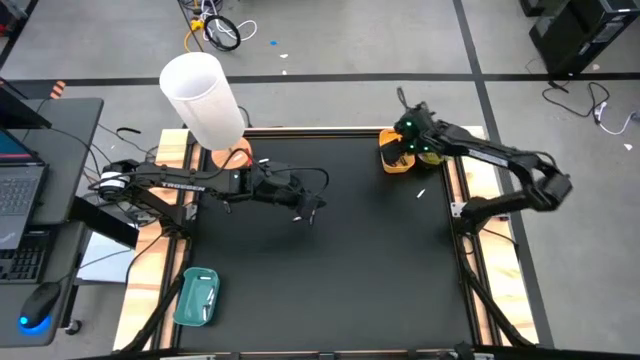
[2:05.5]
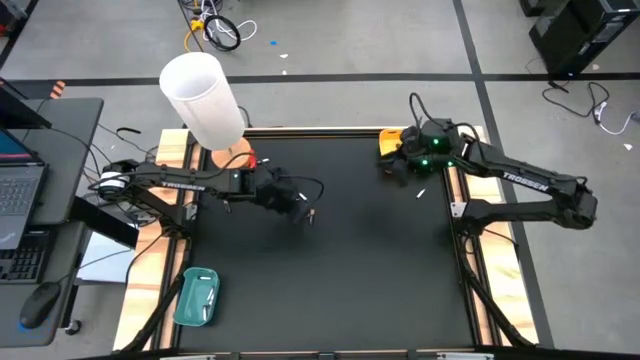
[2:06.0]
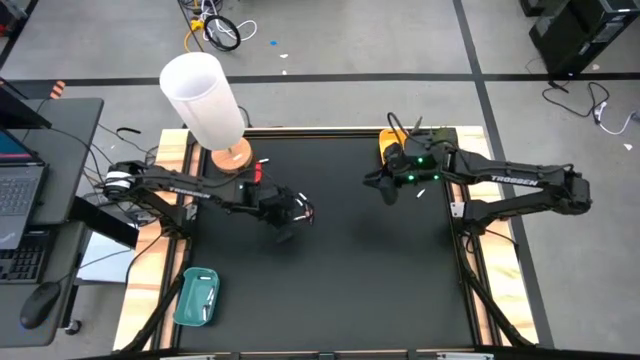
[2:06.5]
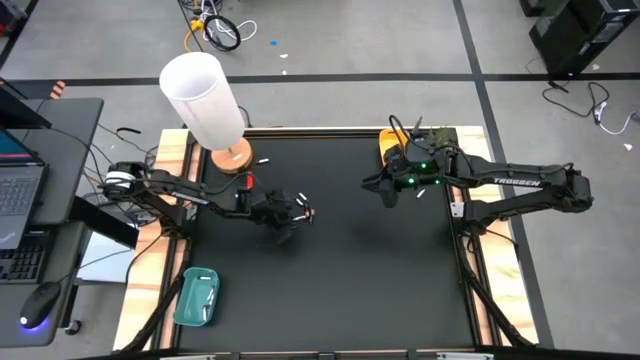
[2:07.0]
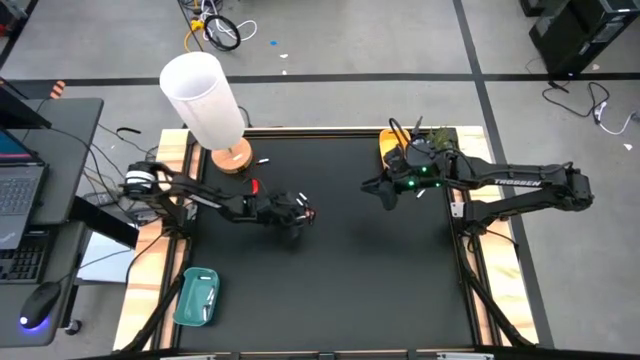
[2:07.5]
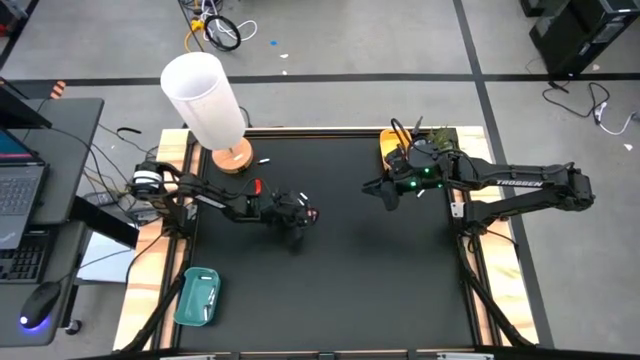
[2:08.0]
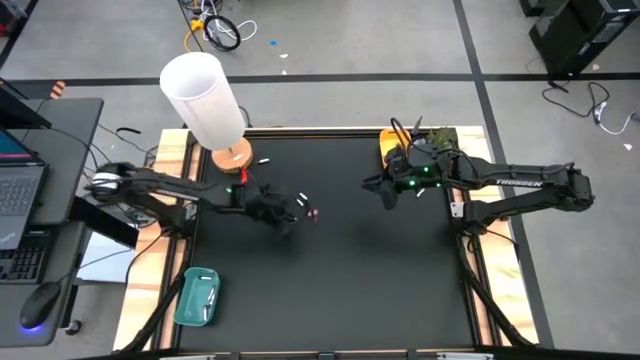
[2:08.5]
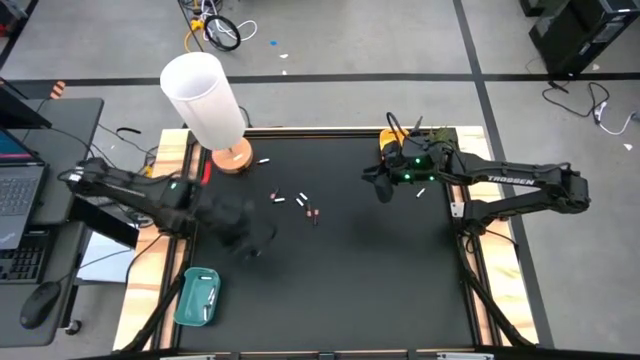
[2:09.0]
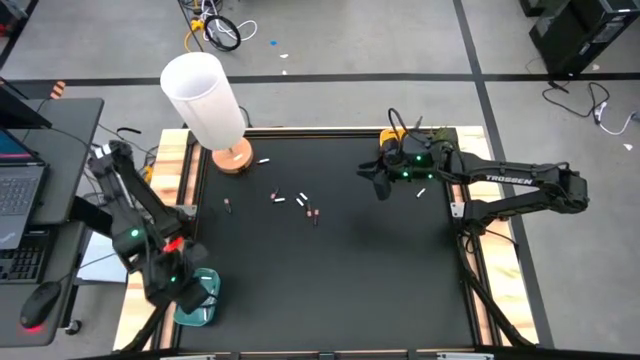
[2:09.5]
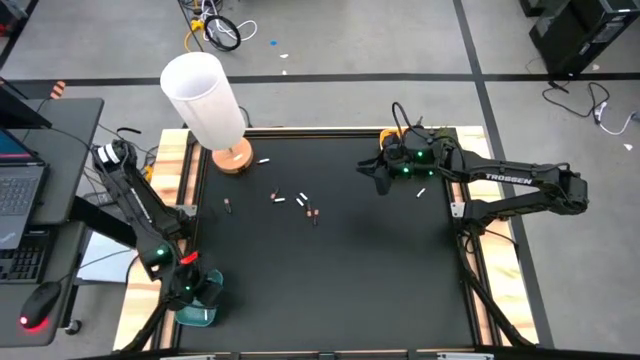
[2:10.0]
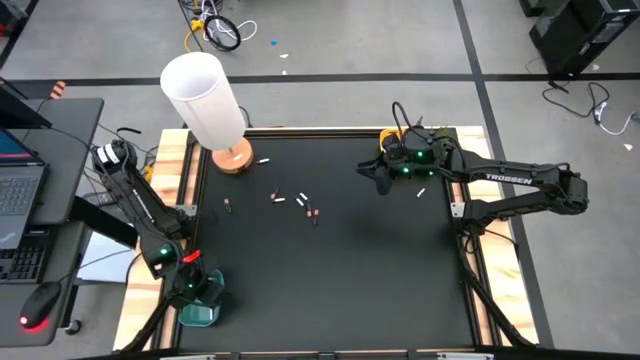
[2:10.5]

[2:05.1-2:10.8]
Task: Sort batteries
Put the silver battery into the blue bin

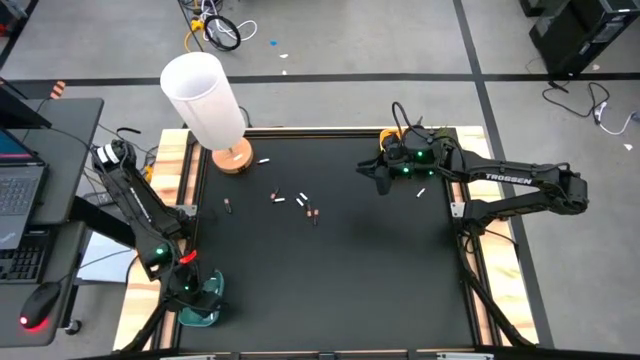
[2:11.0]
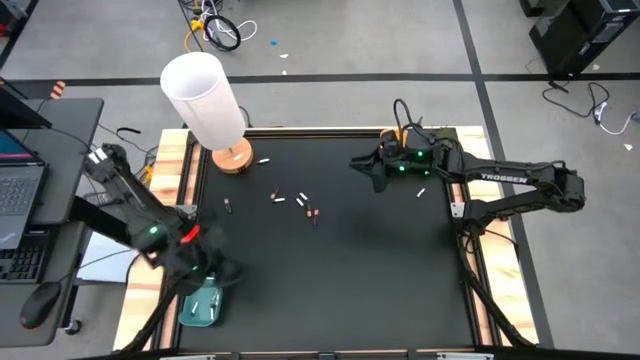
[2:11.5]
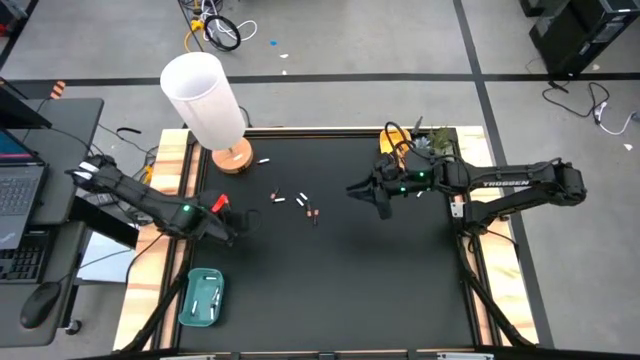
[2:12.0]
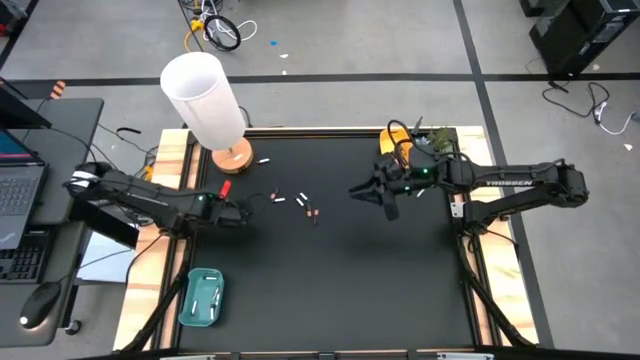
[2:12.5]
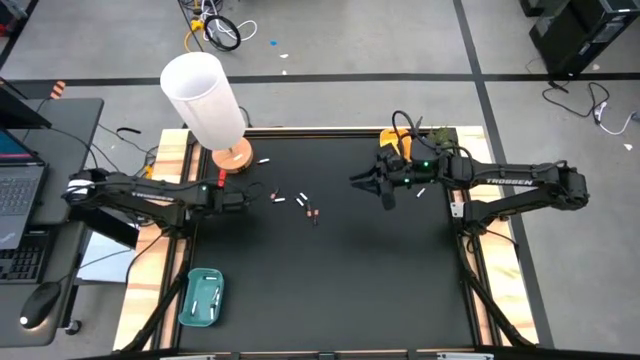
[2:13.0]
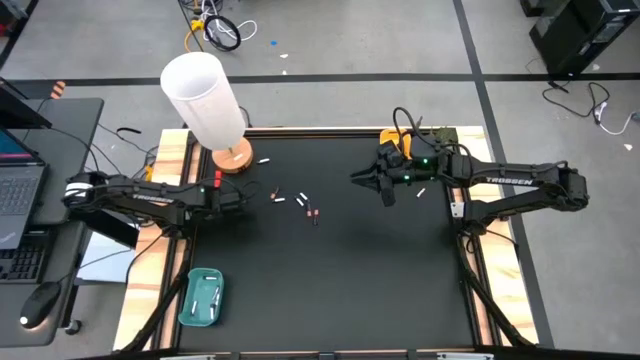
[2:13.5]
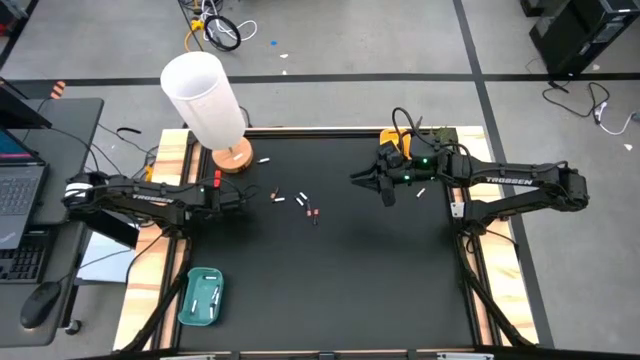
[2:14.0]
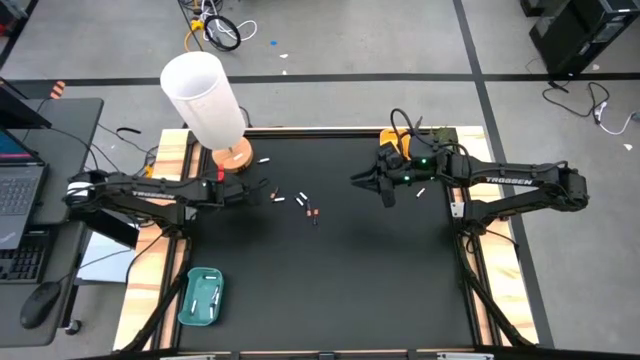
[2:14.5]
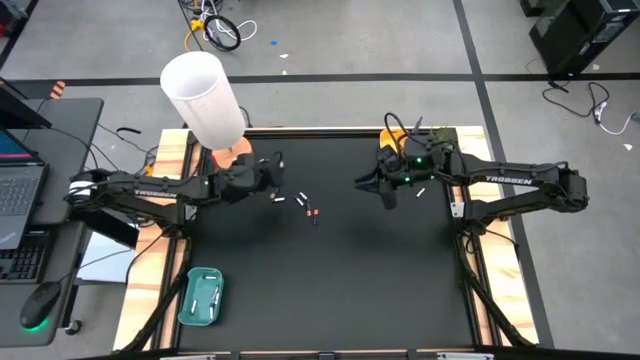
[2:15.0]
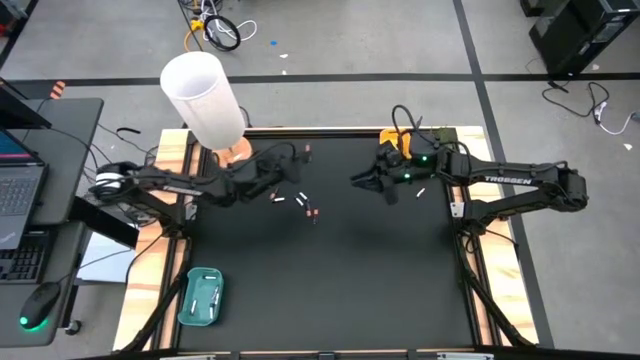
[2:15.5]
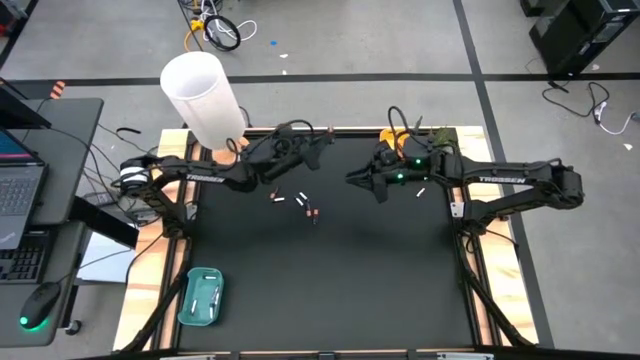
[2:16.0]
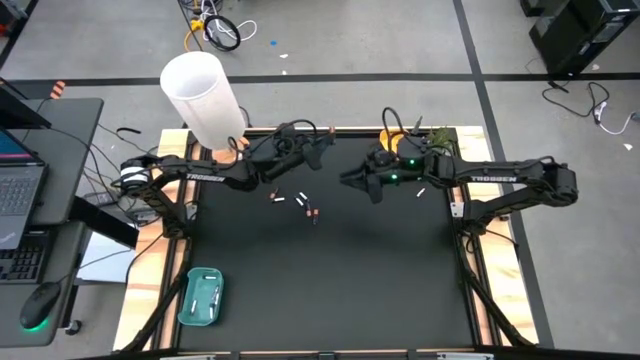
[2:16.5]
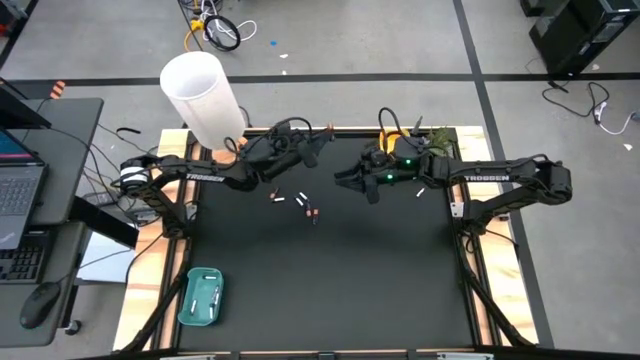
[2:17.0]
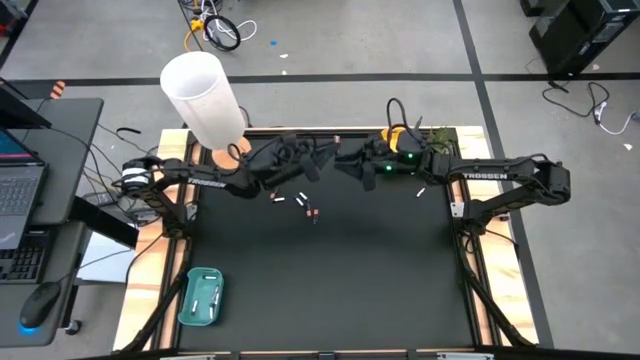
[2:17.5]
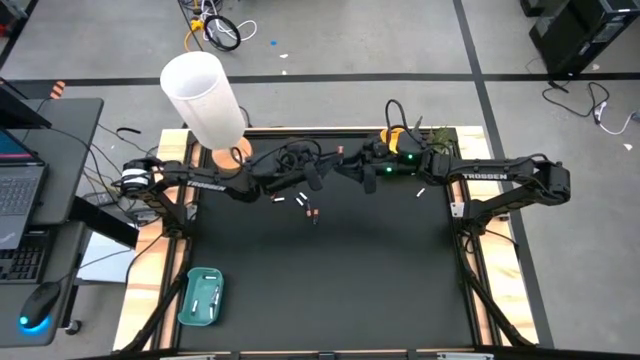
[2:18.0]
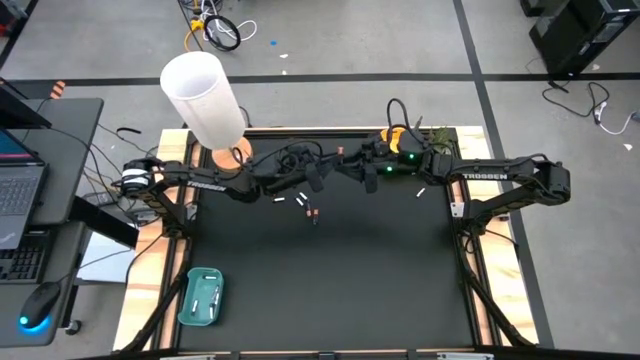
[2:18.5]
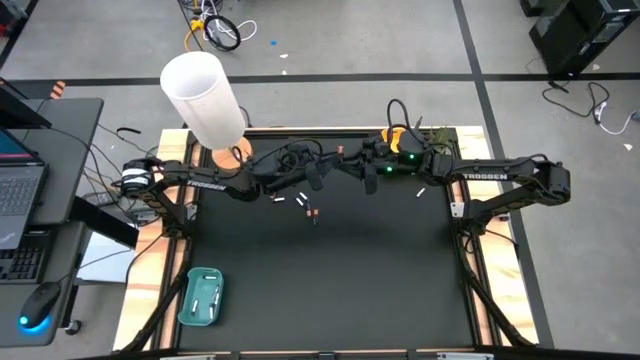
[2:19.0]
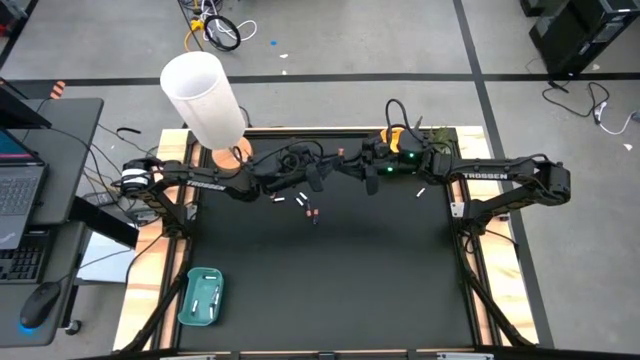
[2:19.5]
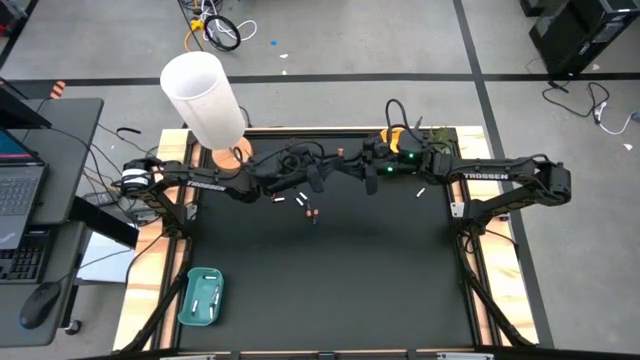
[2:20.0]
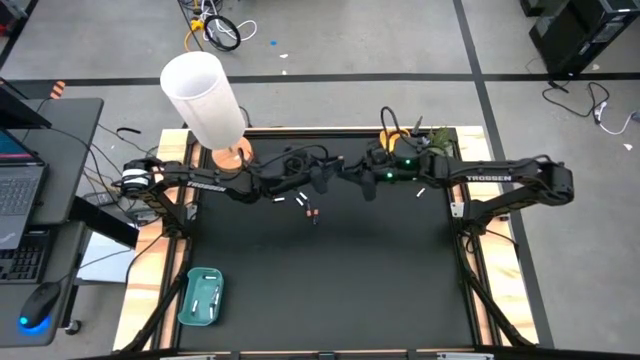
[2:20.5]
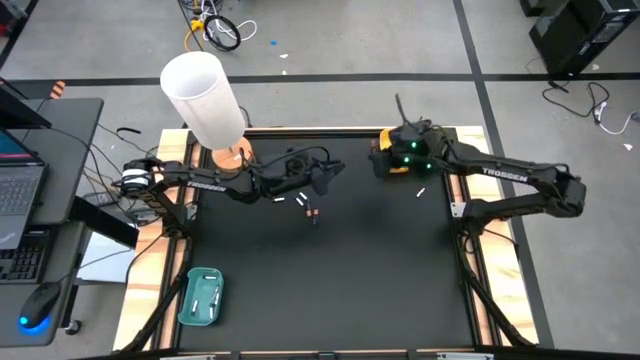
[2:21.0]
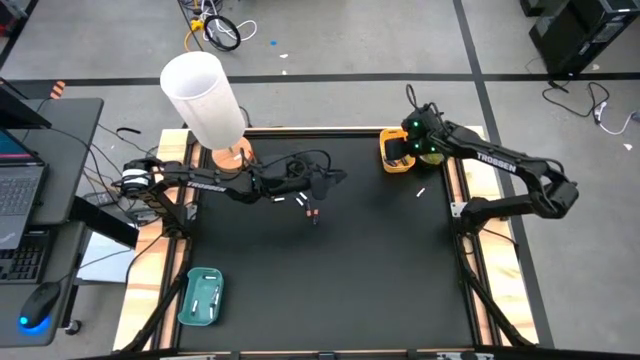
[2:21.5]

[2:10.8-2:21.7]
Put the black battery into the yellow bin

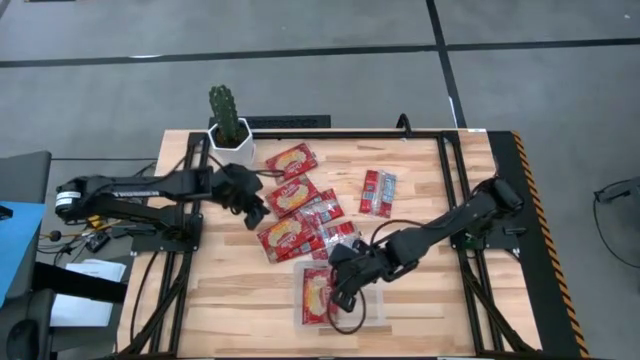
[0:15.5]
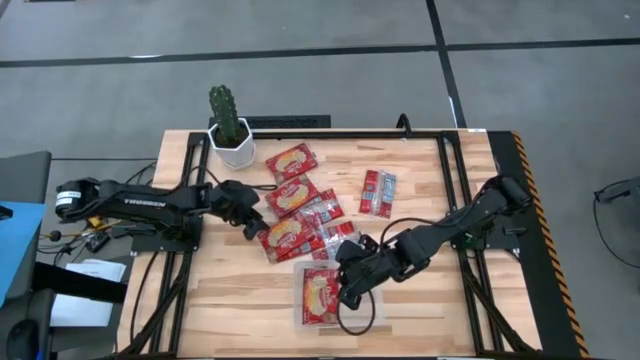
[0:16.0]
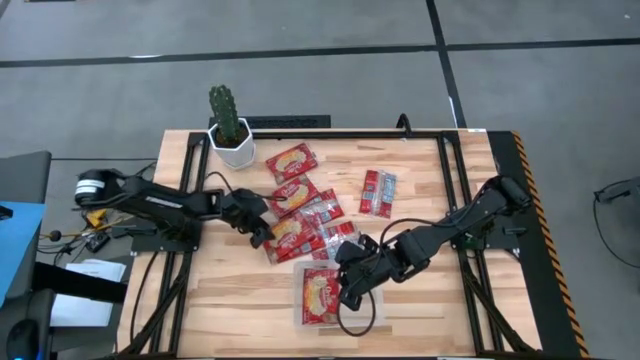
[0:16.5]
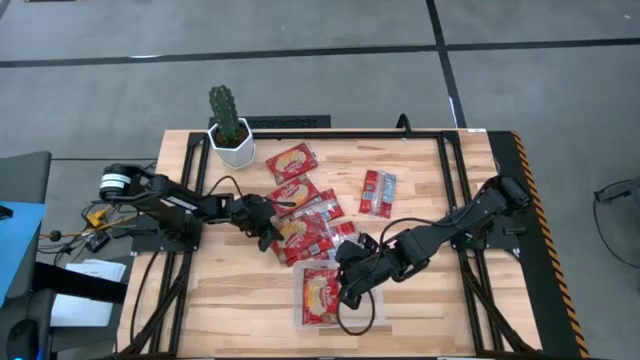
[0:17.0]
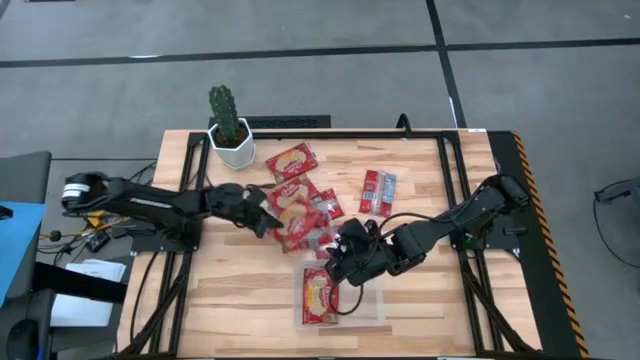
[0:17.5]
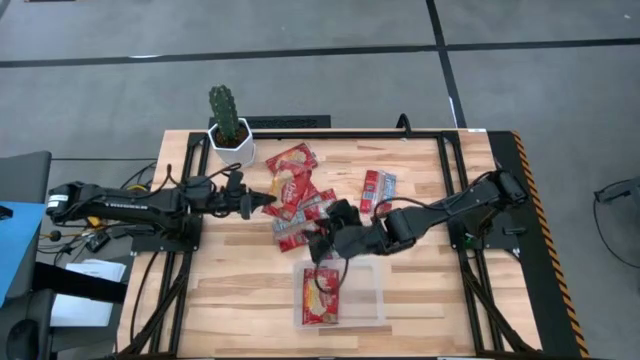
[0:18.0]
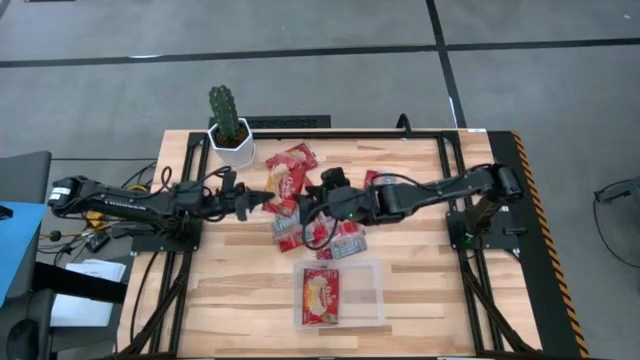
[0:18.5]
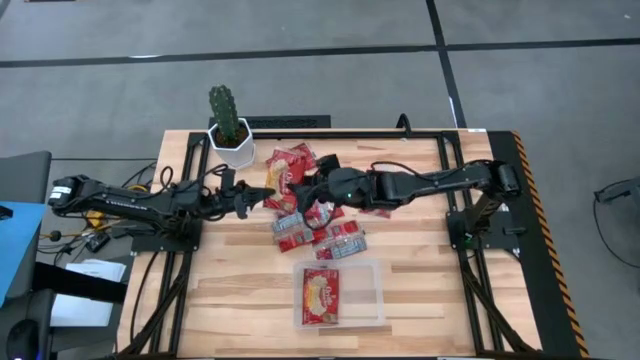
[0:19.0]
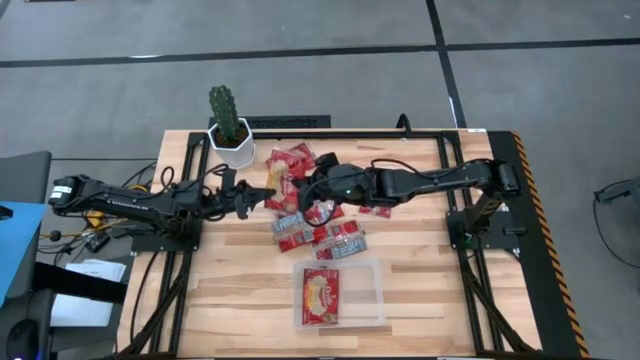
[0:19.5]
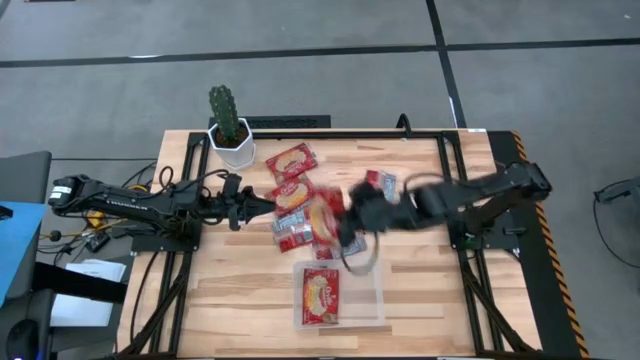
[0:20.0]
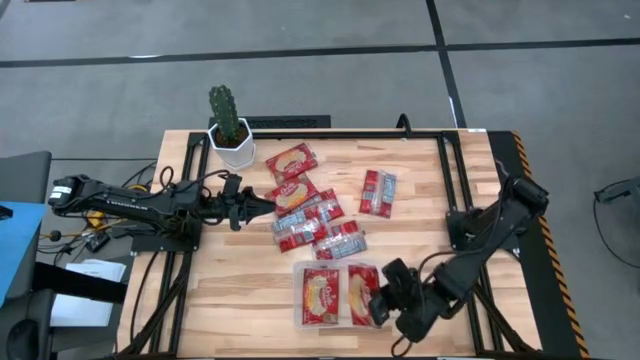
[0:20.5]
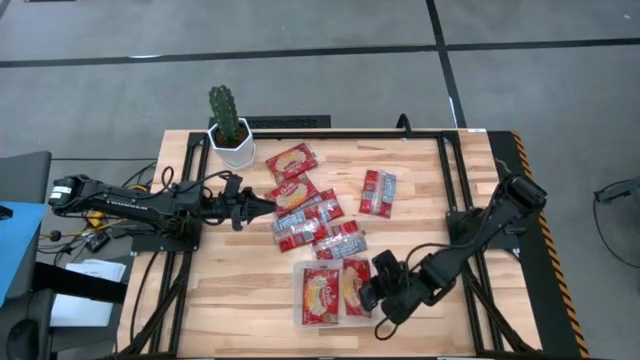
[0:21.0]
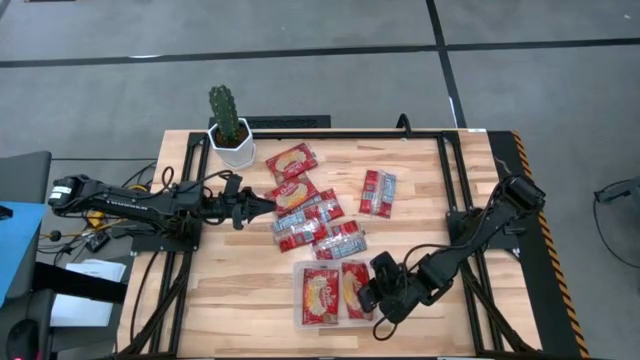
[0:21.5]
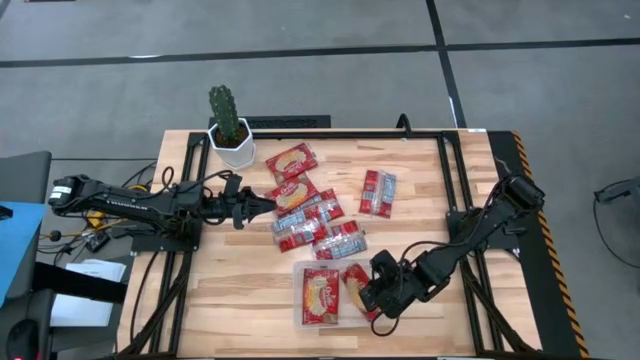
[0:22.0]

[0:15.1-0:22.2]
Task: Sort popcorn bags into baskets
Put the red popcorn bag into the transparent bin
